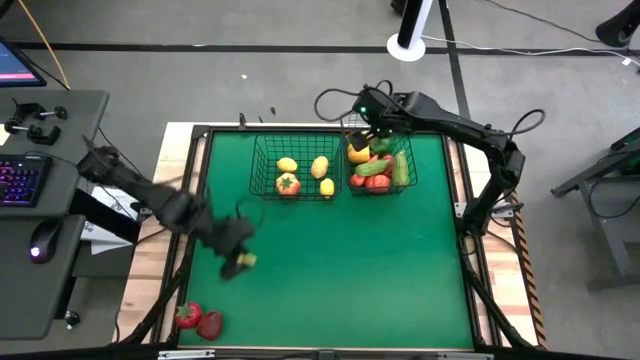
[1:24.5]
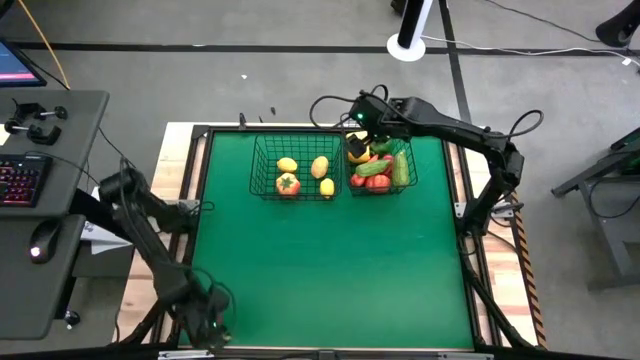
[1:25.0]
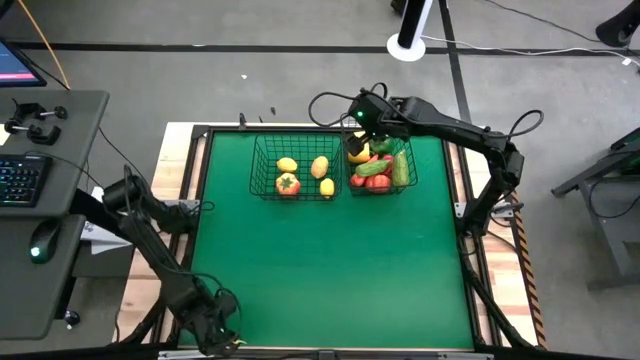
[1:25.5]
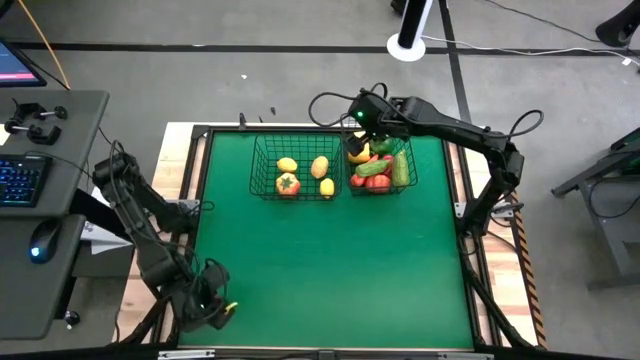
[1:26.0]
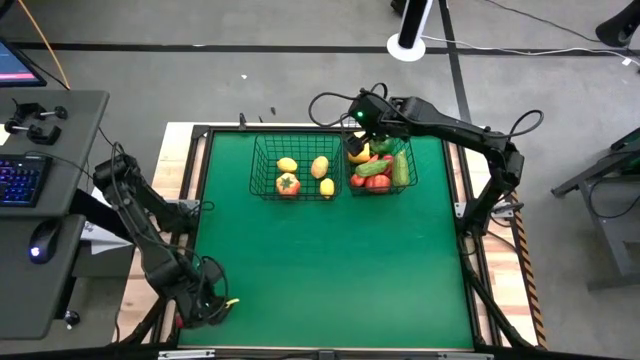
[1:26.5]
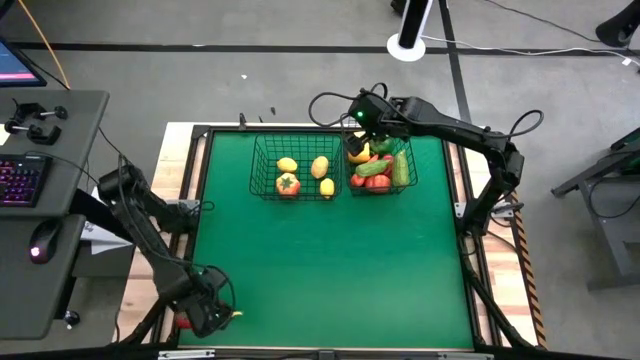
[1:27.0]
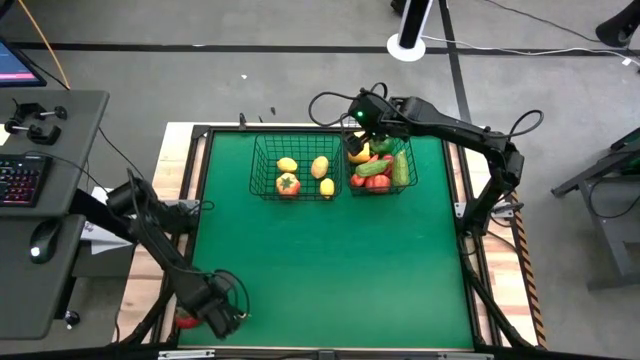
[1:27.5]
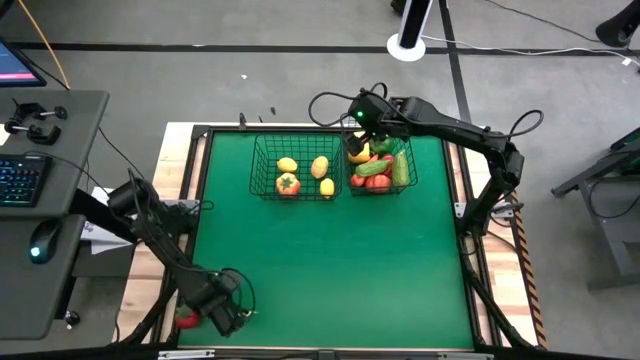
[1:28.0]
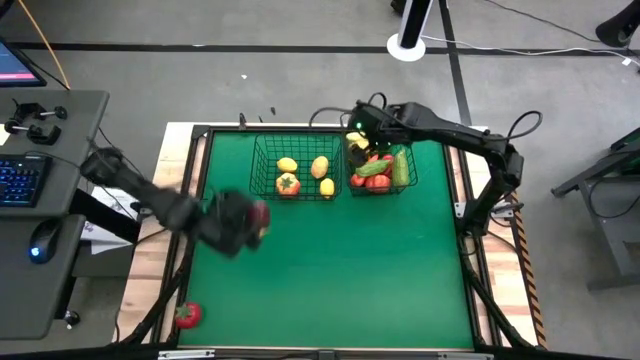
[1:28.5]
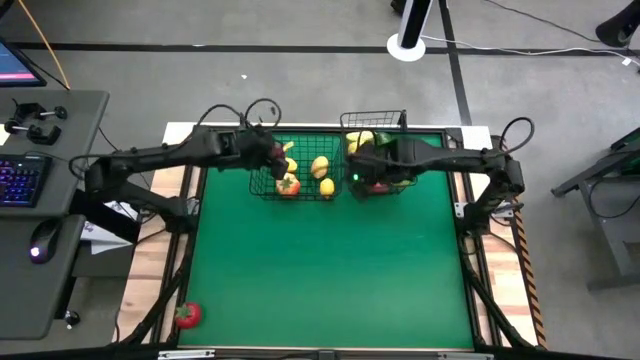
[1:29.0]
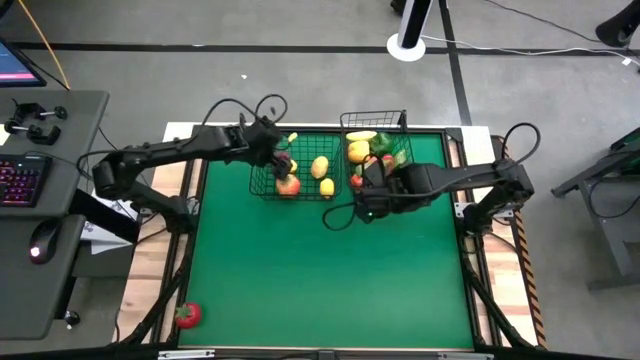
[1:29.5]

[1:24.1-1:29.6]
Task: Sort produce into baskets
Put the red apple into the left wire basket

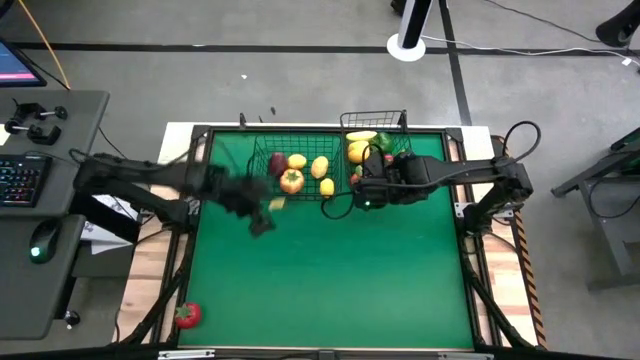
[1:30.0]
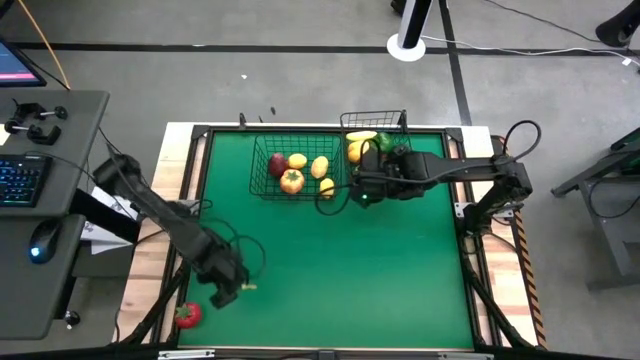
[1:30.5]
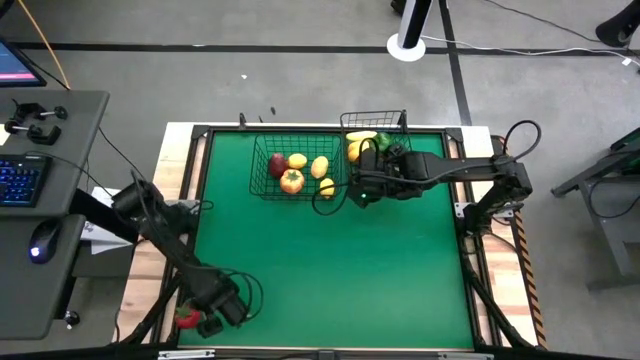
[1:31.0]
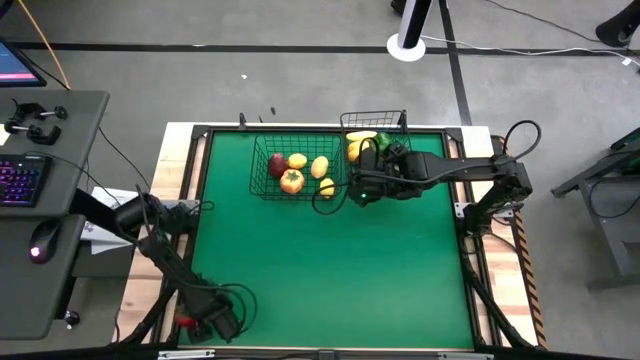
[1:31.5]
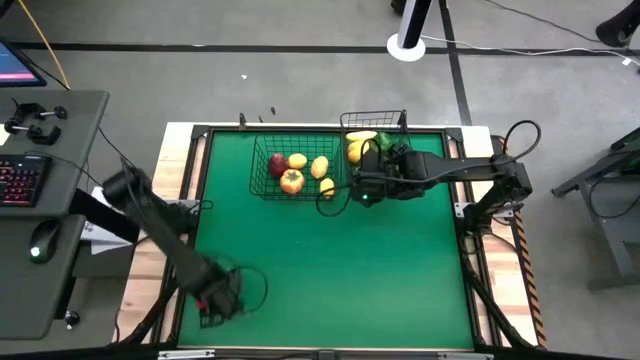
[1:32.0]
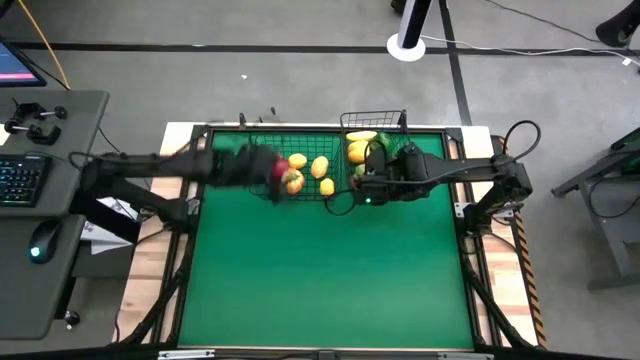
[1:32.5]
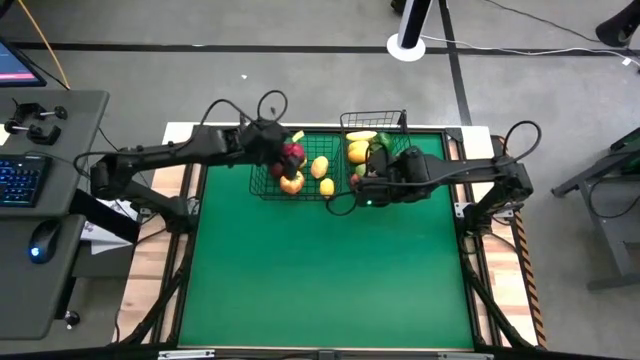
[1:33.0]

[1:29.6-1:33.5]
Put the red tomato into the left wire basket

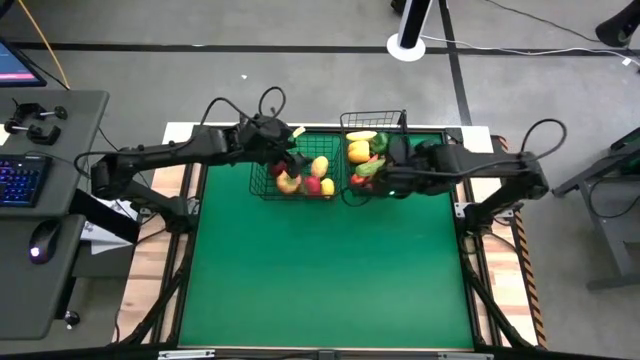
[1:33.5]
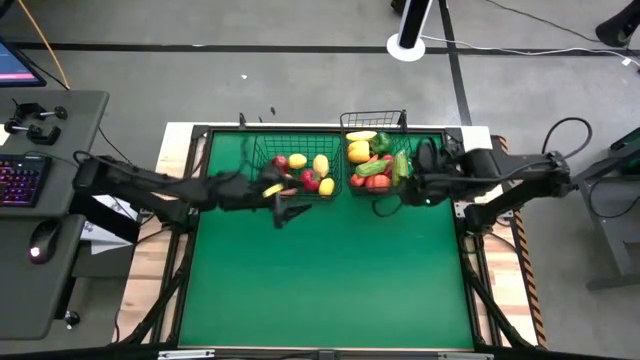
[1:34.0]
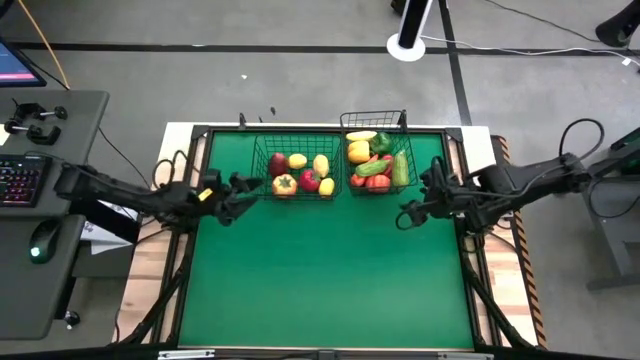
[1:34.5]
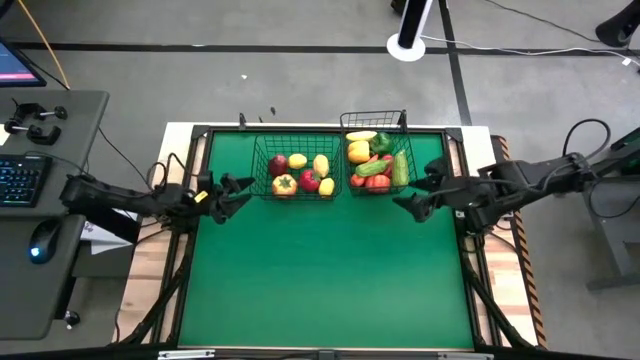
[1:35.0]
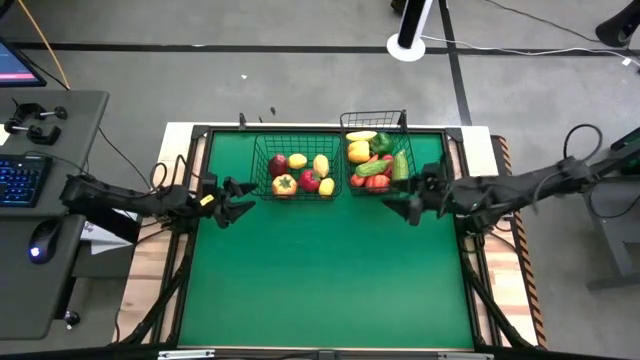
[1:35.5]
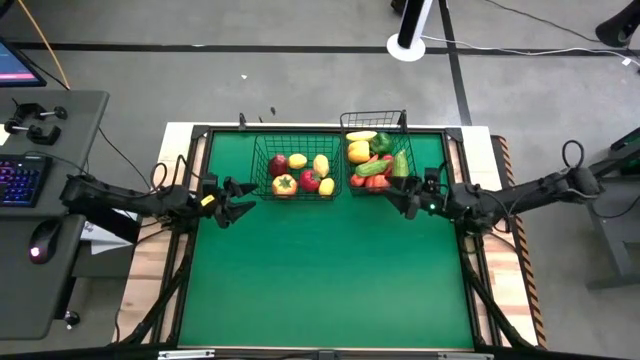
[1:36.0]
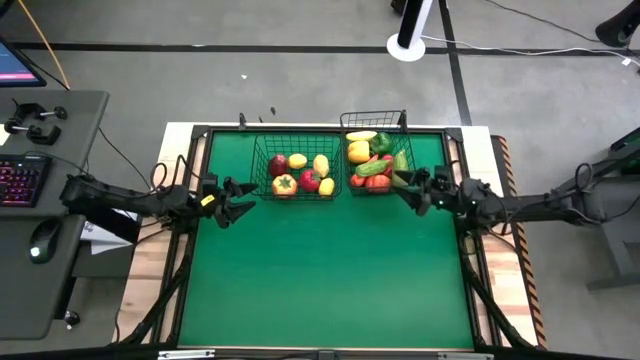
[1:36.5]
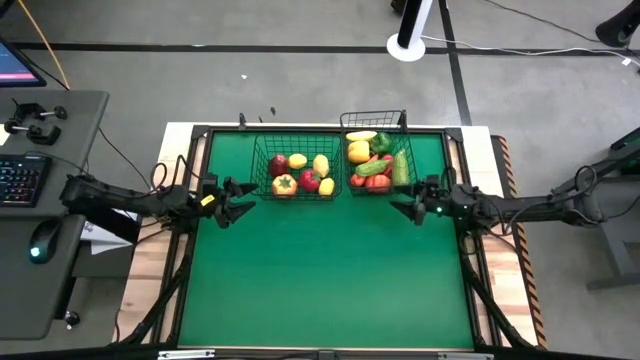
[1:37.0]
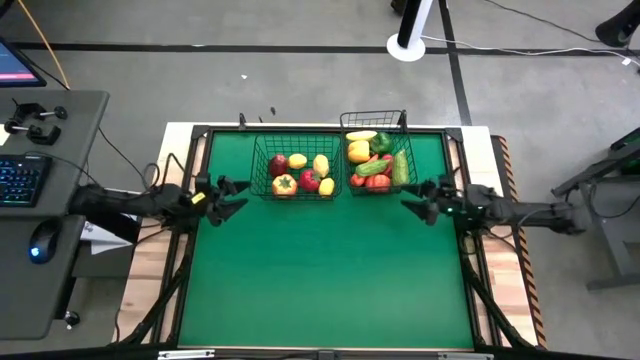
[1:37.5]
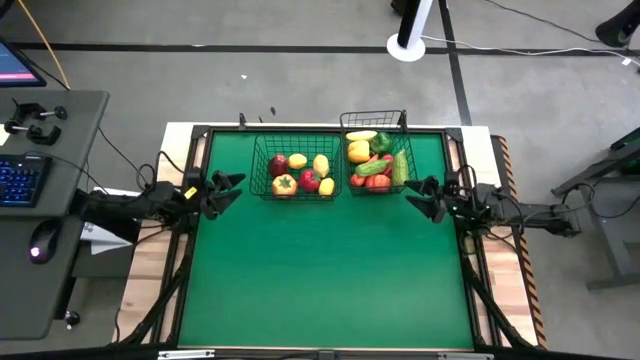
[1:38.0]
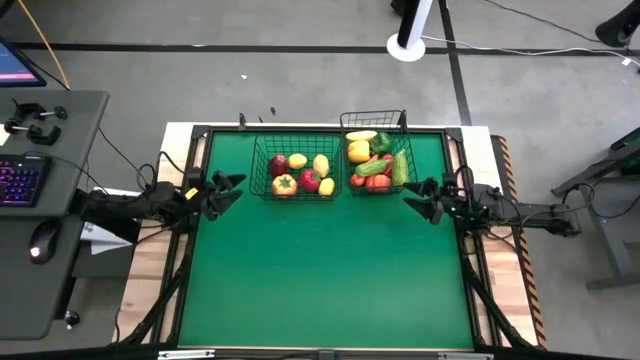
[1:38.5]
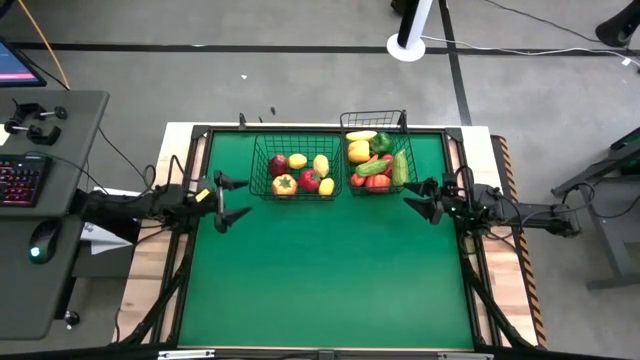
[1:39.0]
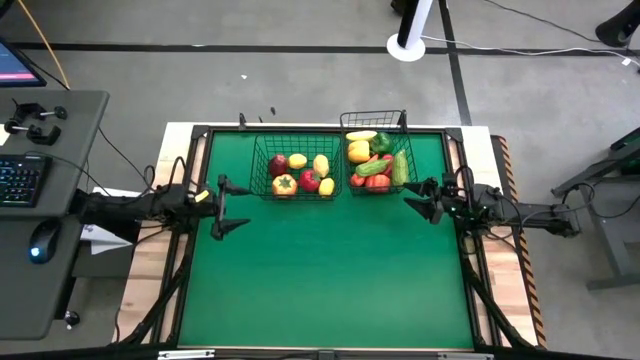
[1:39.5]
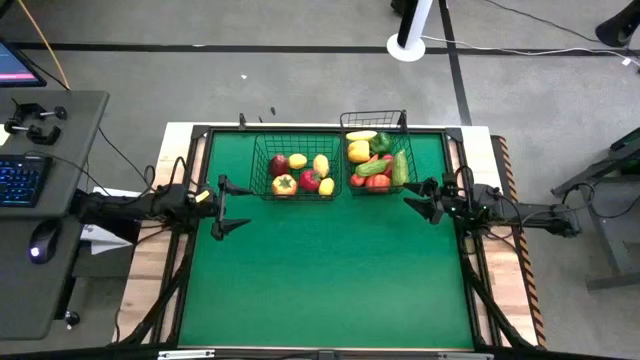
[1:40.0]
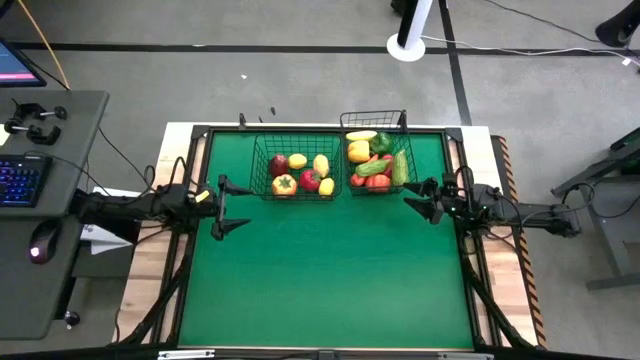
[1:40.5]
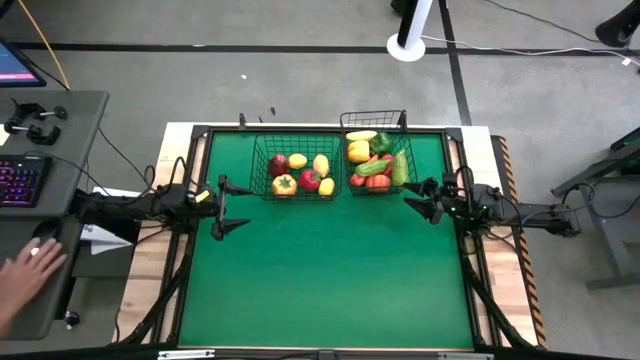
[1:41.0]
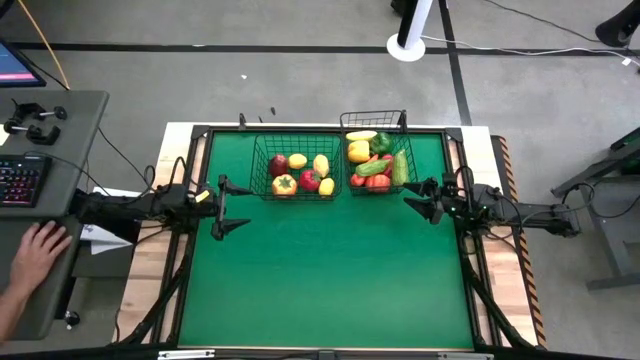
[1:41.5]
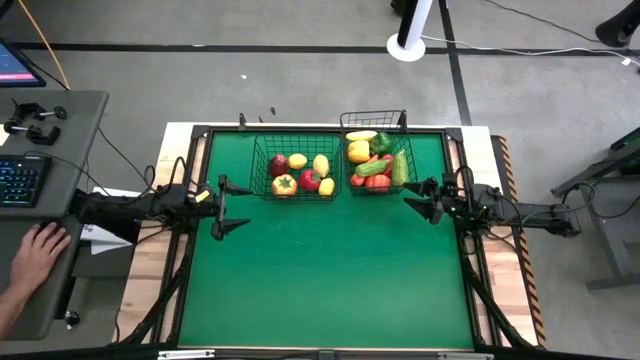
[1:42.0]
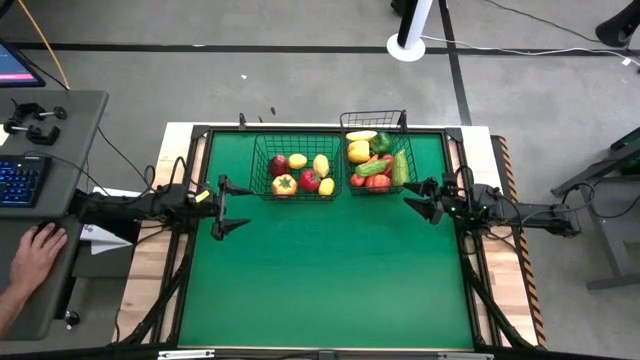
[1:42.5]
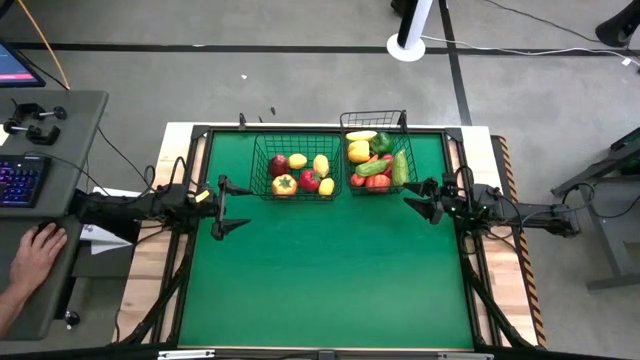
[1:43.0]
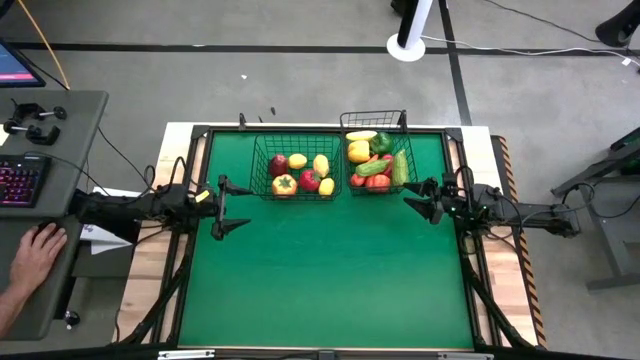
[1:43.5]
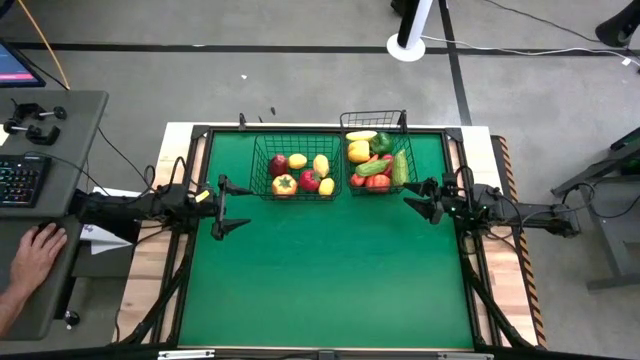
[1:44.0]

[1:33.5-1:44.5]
Return to Home Position

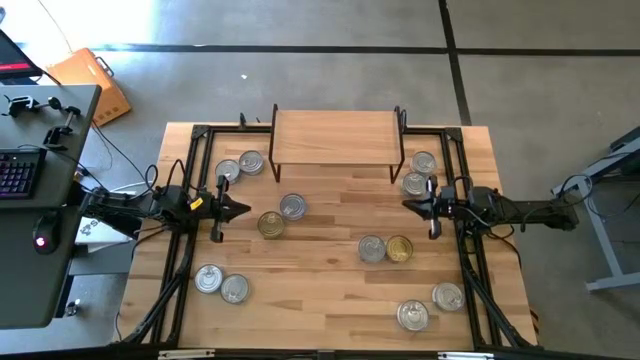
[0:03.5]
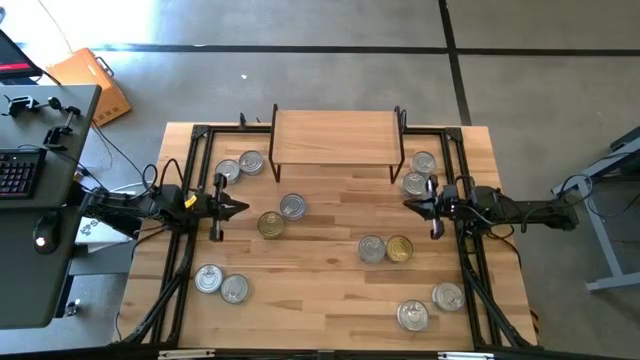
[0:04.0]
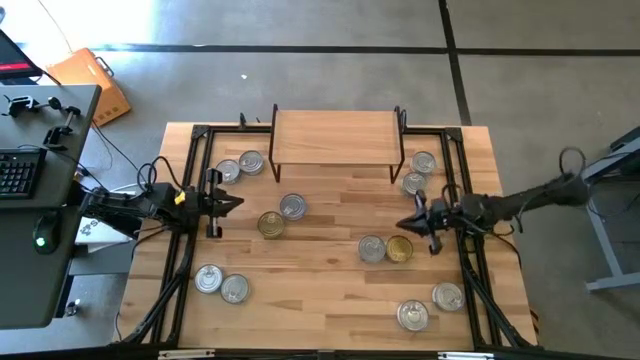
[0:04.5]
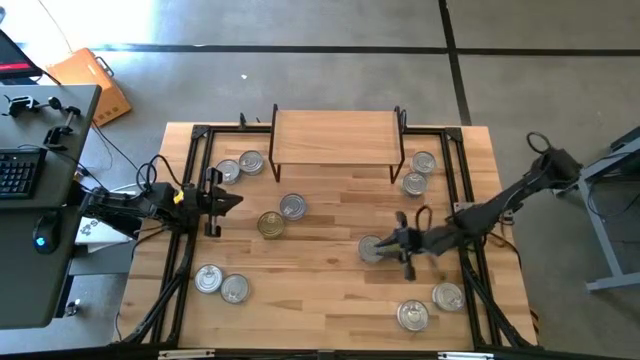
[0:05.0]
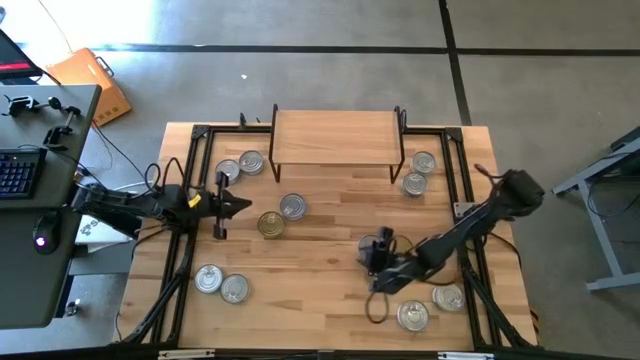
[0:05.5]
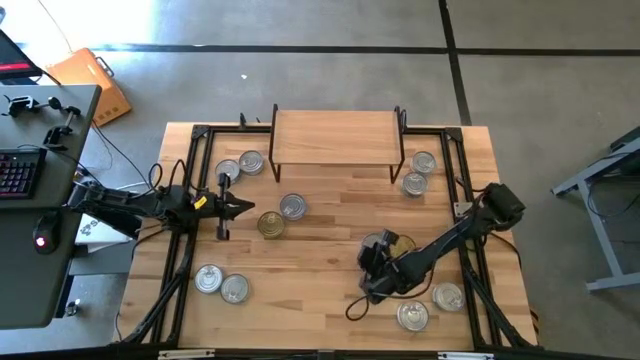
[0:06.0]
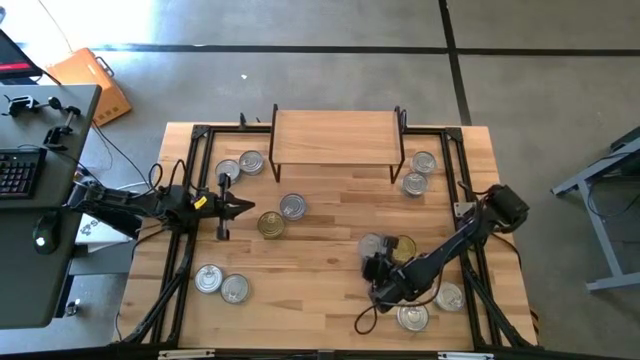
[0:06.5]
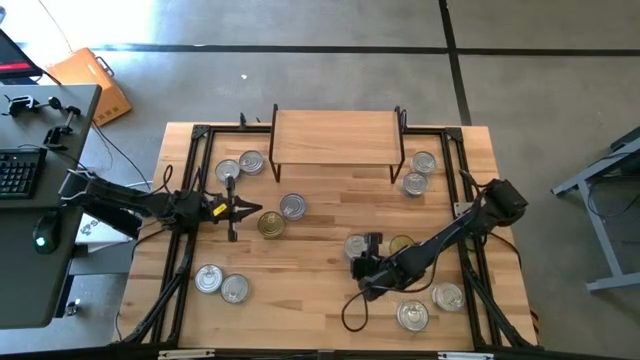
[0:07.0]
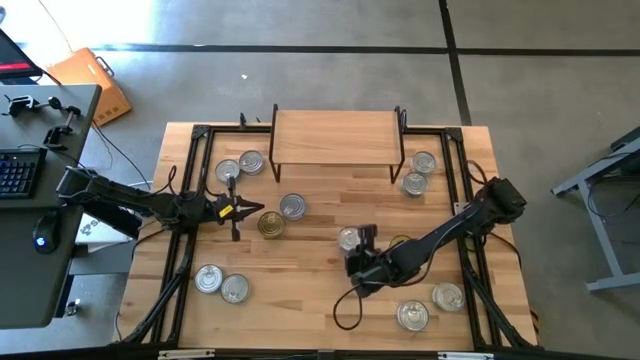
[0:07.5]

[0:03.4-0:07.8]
Task: Stack canned seafood by type on shelf
Put the blue tuna can on the shelf
